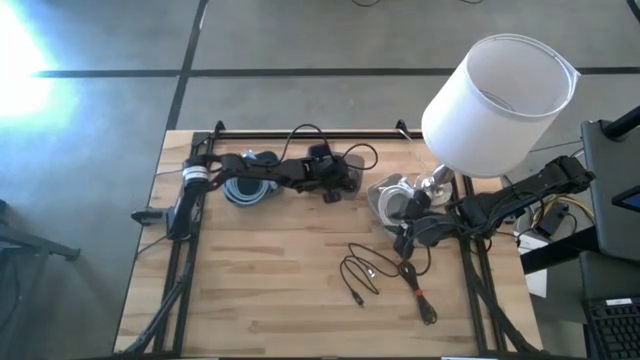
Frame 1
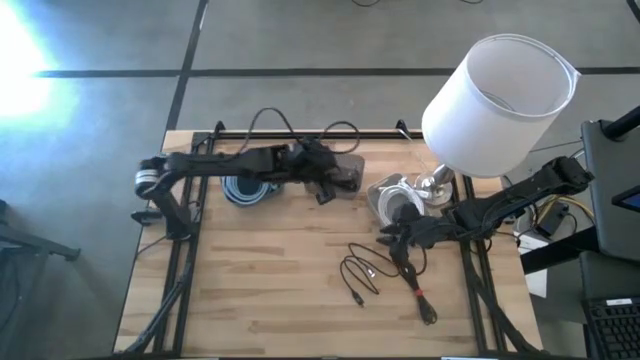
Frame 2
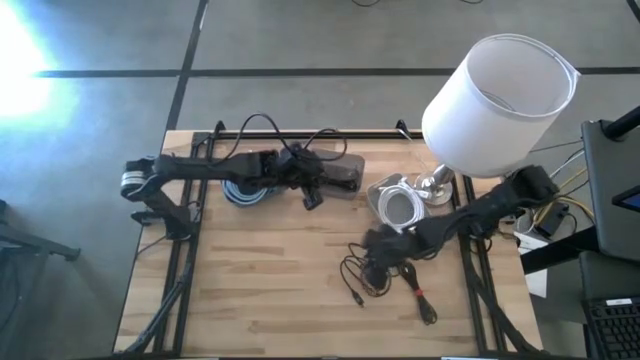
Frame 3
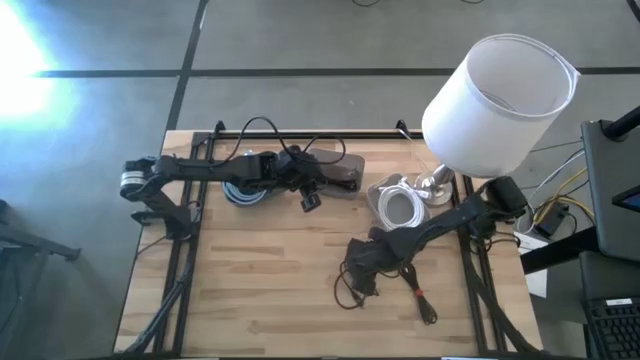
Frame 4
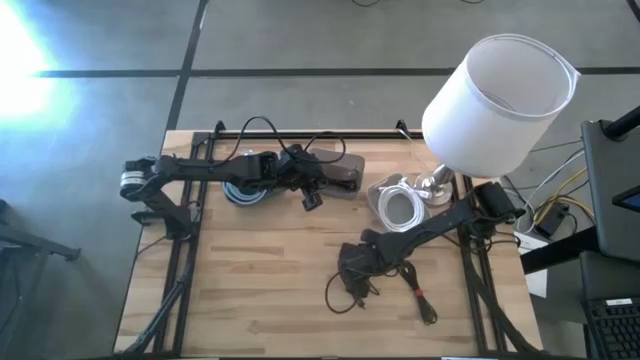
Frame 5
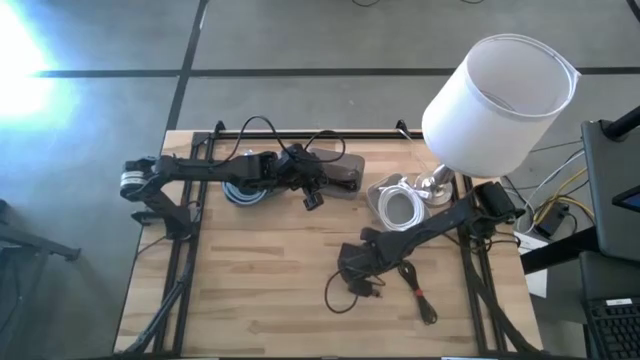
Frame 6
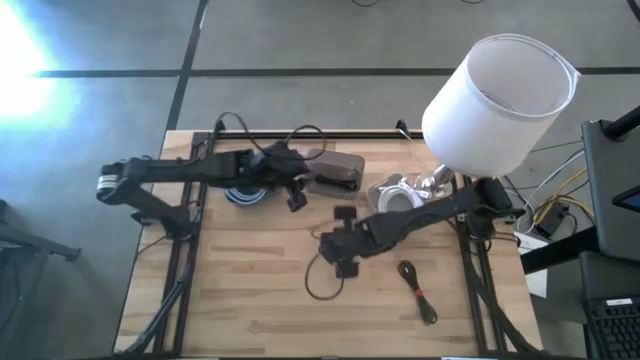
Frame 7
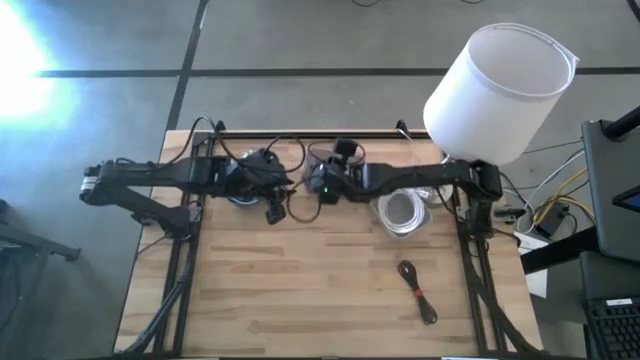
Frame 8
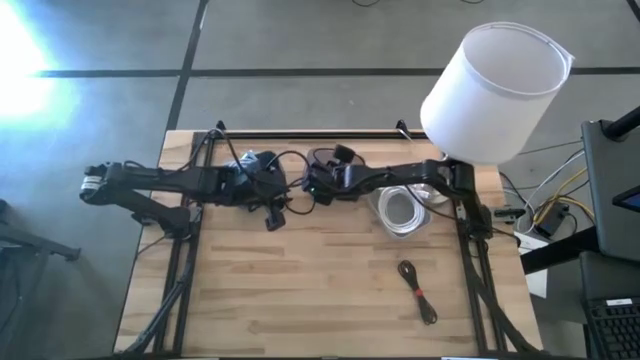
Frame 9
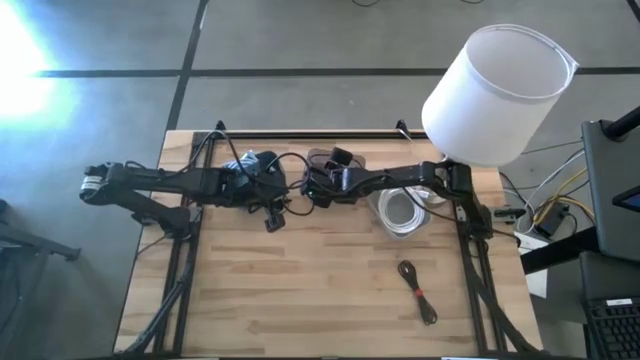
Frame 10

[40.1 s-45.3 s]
Task: Pick & Place USB Port
Put the left black charger cable into the black bin

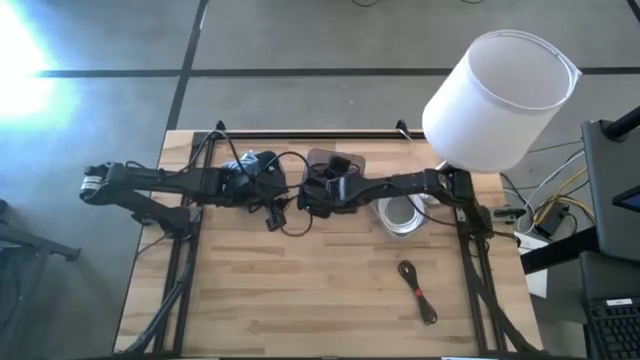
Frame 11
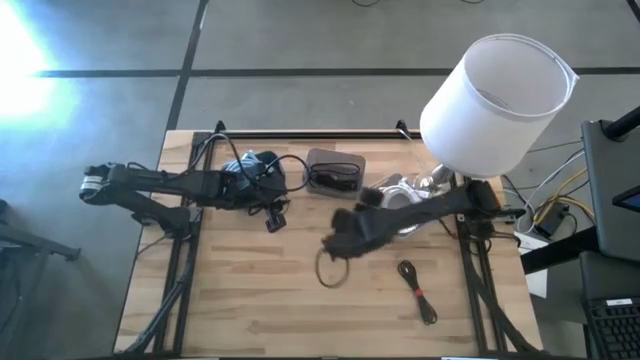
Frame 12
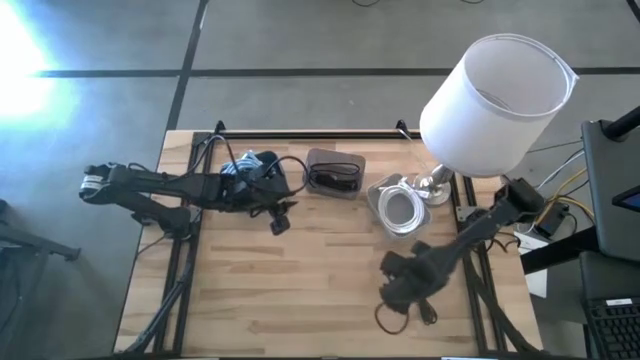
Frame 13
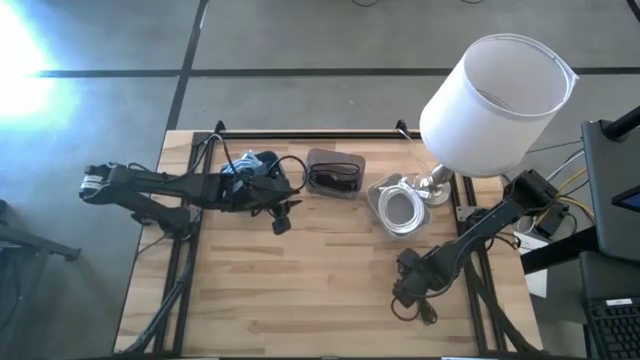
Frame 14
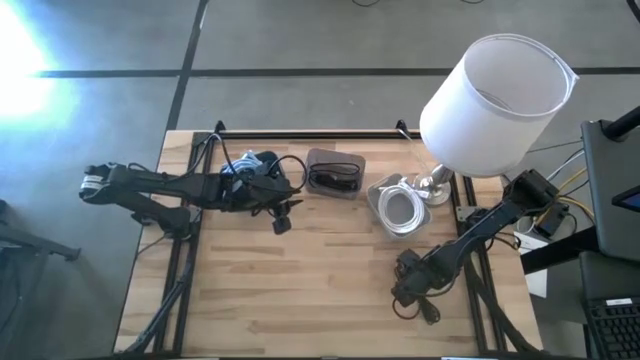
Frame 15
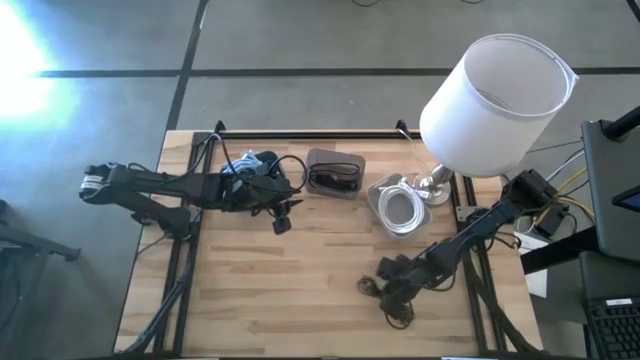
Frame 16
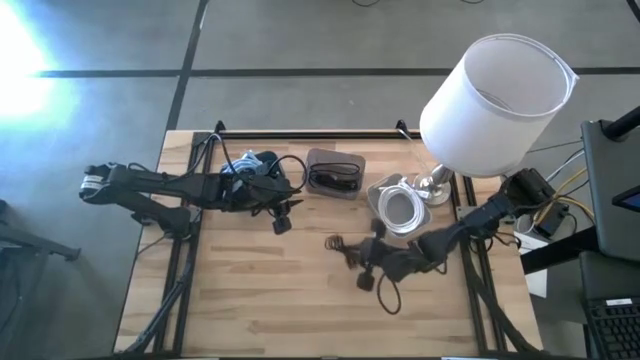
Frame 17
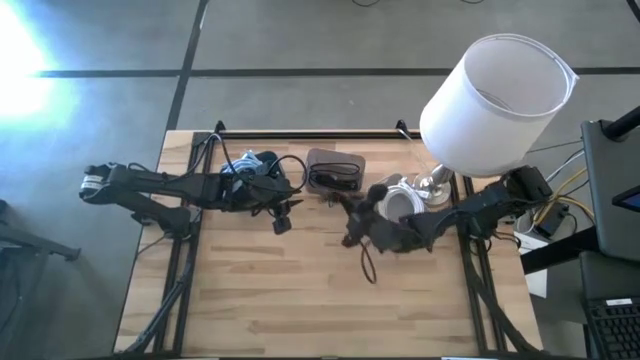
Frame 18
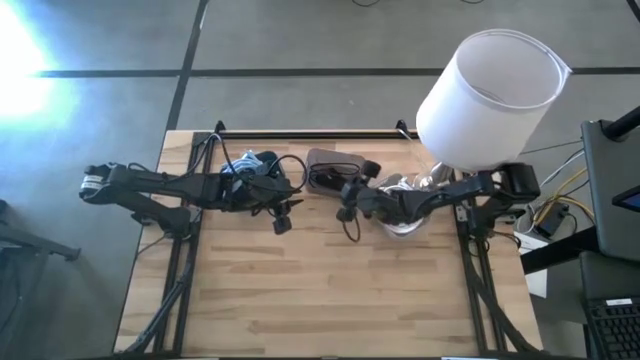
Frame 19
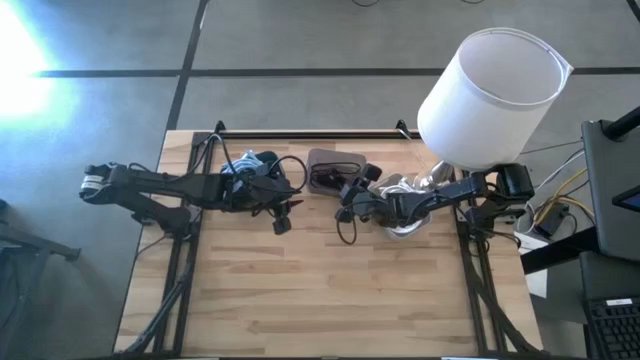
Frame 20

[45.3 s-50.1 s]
Put the black charger cable into the black bin

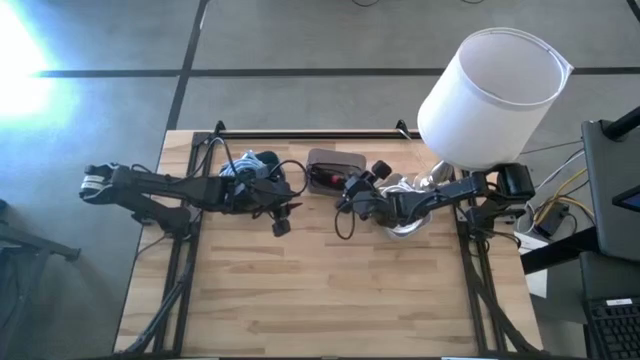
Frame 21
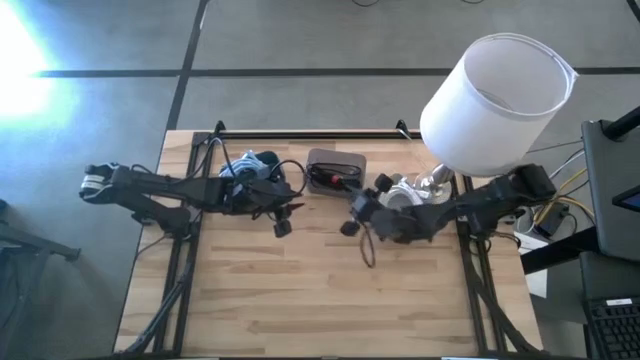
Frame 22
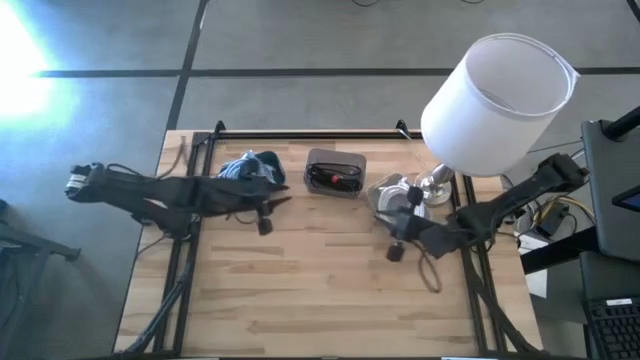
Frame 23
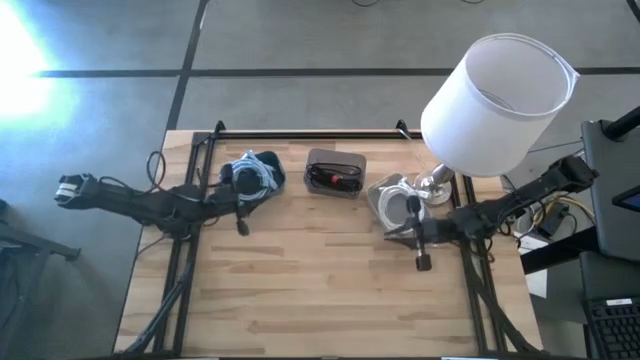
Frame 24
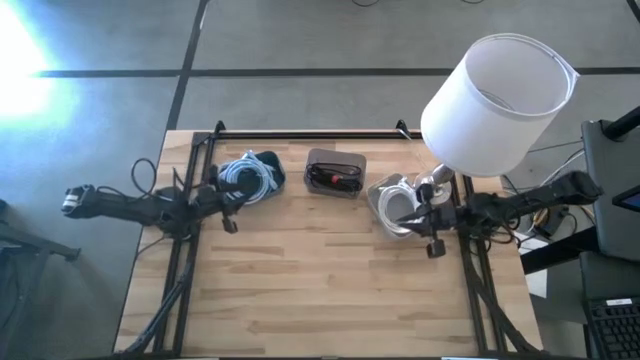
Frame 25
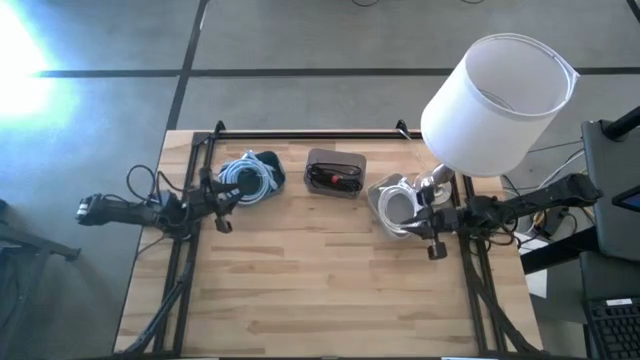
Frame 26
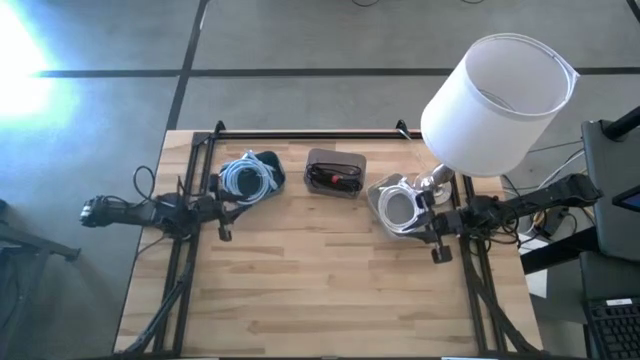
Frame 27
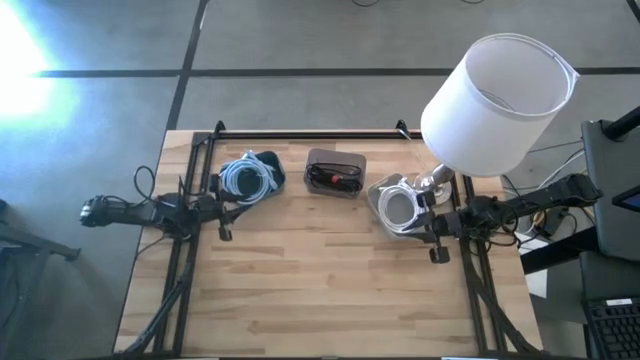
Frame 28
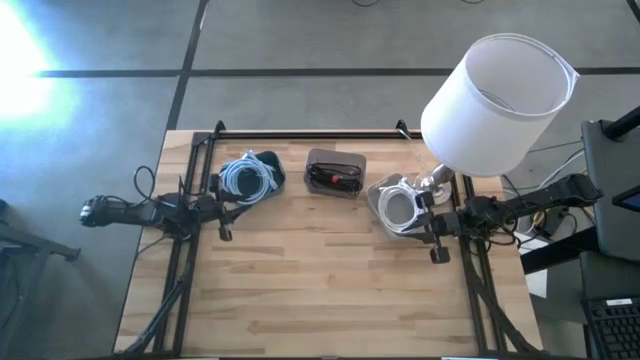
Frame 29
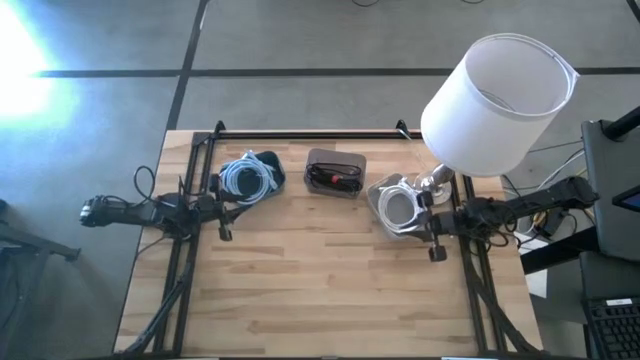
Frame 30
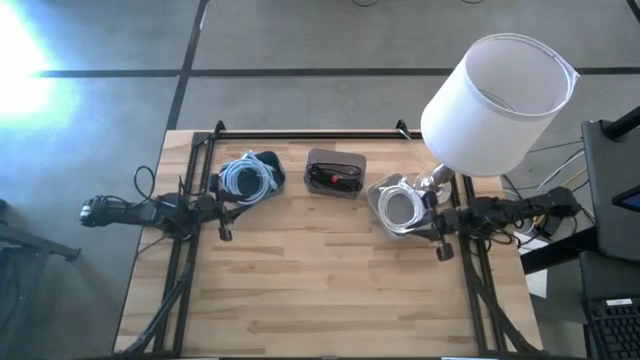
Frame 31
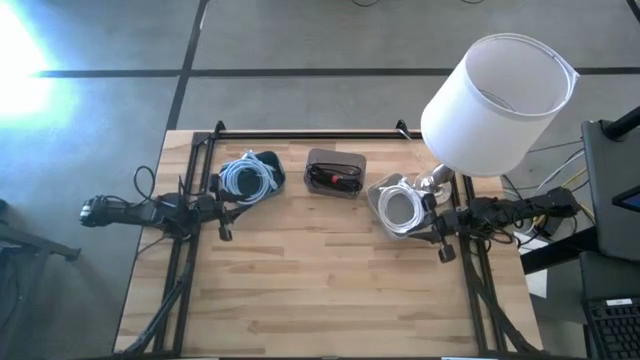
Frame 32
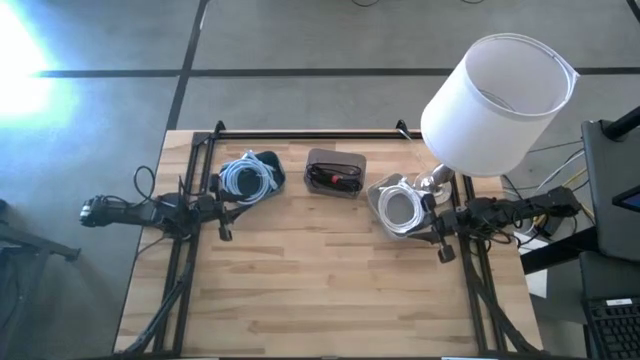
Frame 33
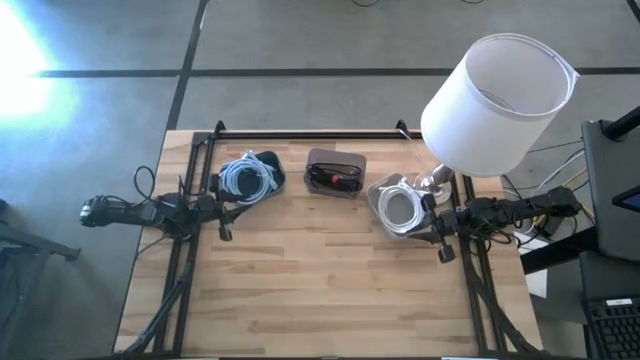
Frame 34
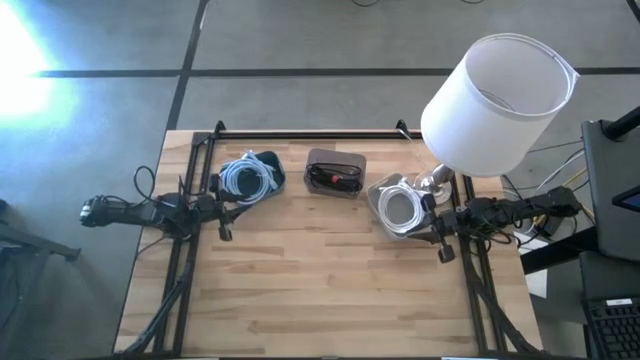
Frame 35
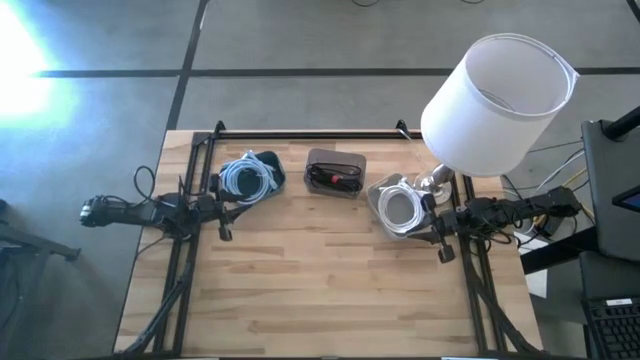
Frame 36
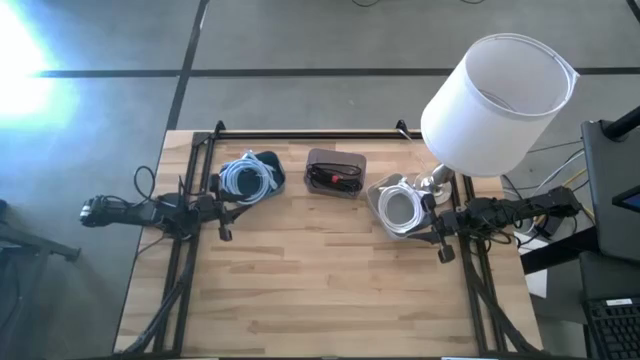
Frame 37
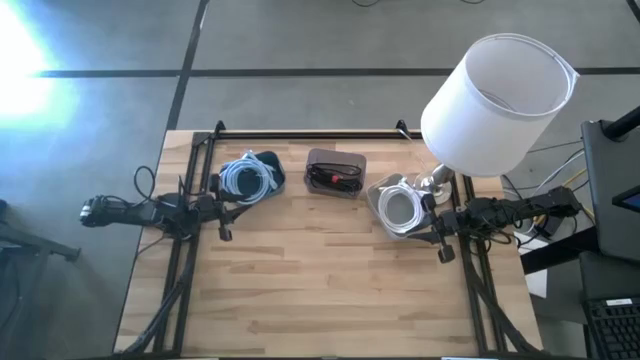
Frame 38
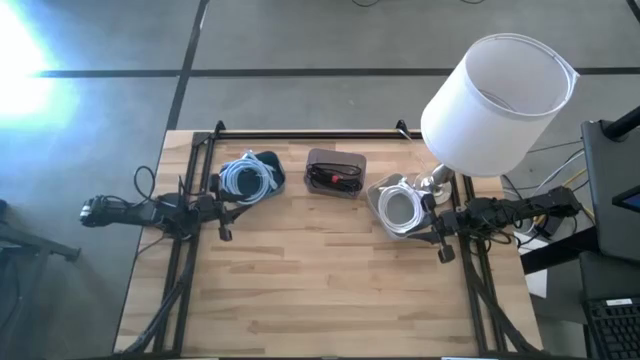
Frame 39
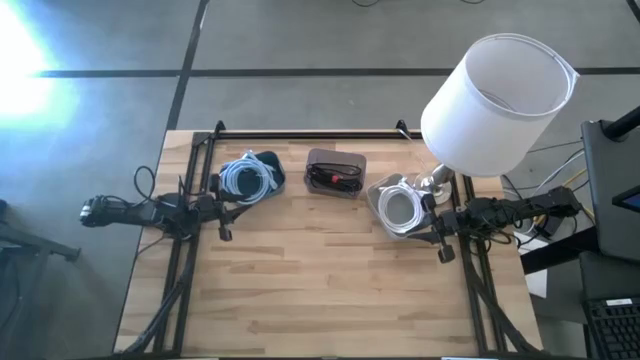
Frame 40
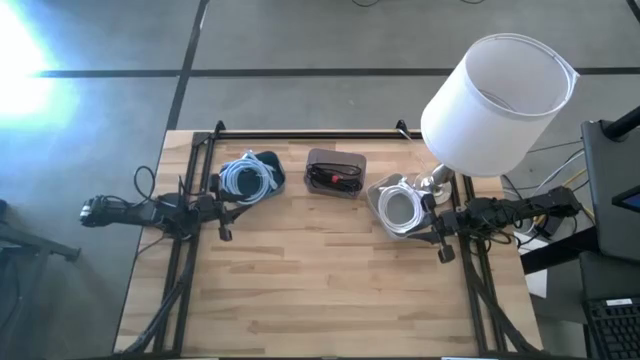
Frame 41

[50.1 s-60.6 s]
Return to Home Position
